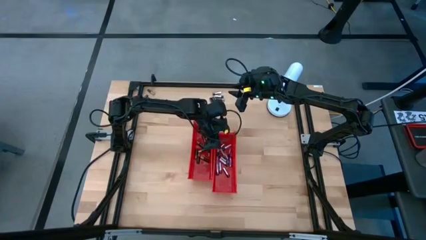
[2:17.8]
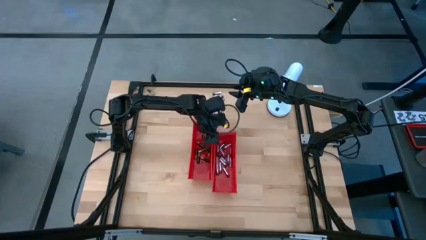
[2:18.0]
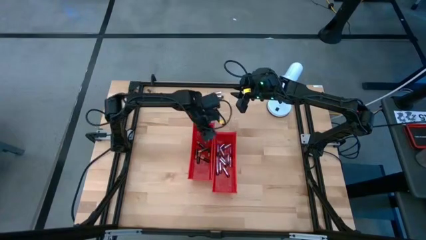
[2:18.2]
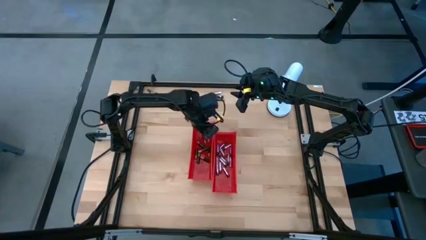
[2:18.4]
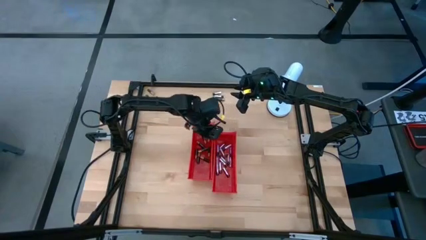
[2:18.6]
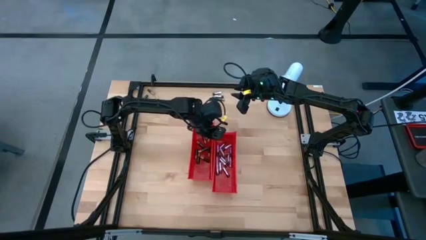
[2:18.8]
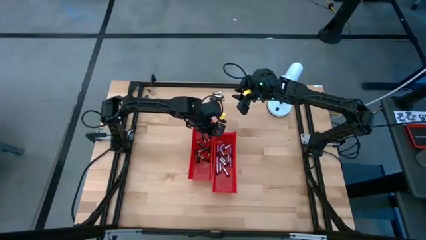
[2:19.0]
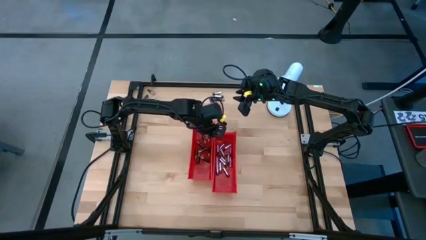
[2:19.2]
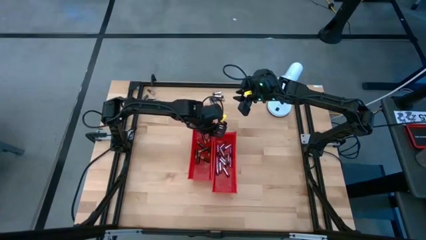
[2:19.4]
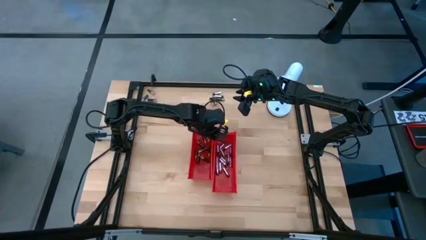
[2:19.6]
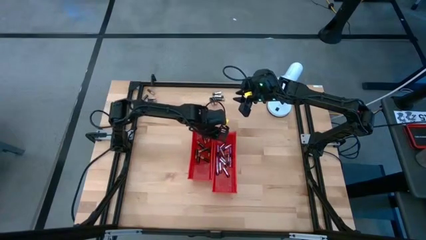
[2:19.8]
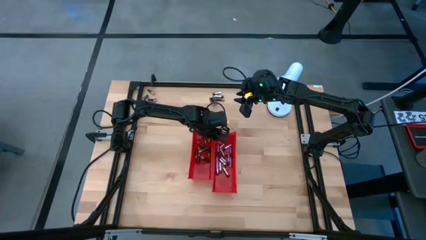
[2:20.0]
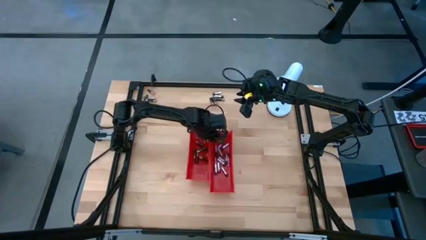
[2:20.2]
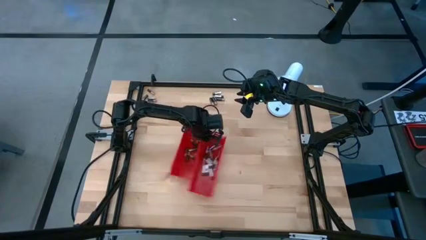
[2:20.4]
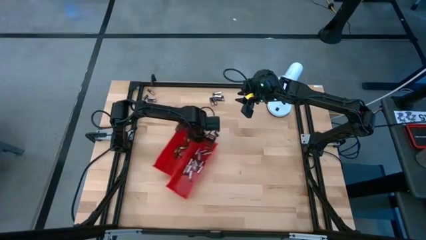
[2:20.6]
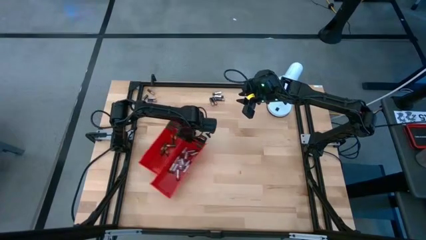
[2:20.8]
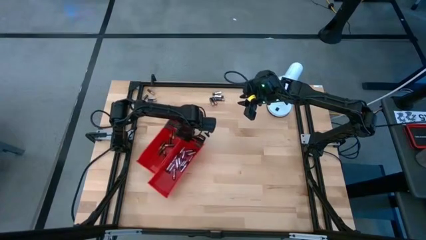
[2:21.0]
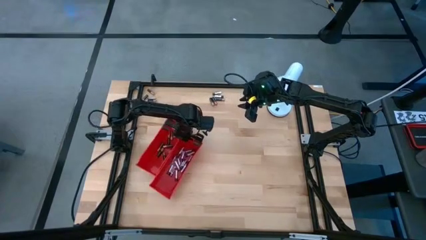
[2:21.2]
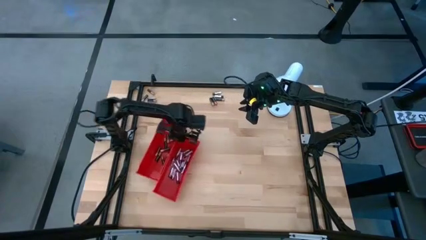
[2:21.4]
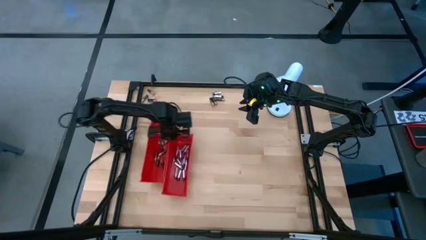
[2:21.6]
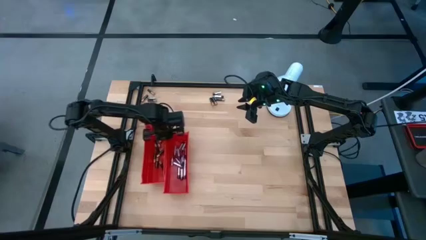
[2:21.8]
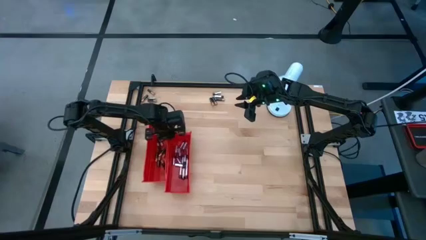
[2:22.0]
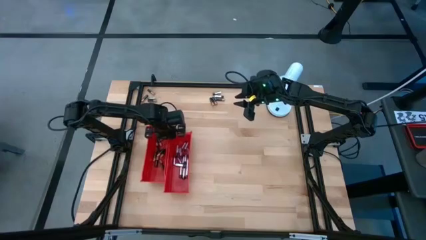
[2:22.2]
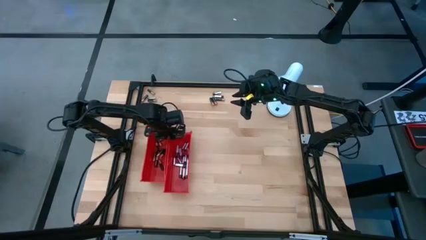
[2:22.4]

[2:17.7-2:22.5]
Task: Sort batteries
Move the bins from the center to the middle left side of the table

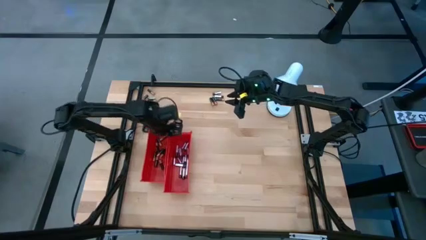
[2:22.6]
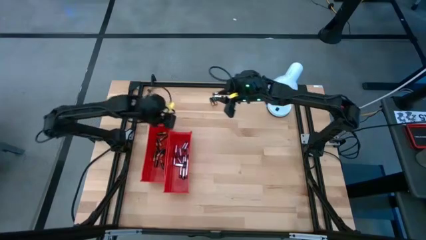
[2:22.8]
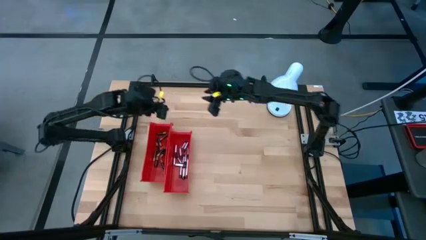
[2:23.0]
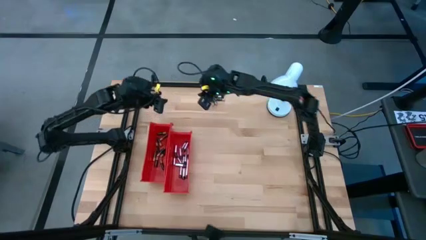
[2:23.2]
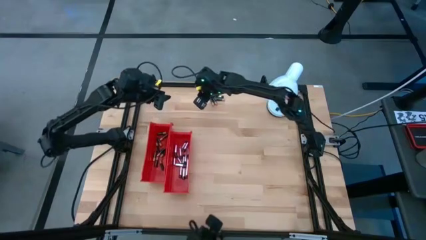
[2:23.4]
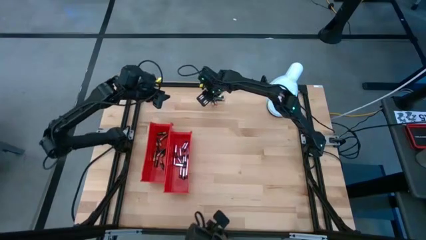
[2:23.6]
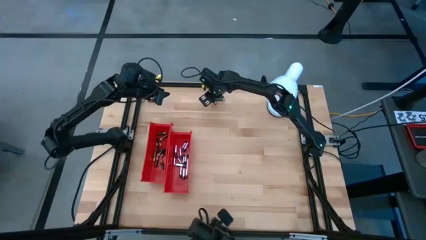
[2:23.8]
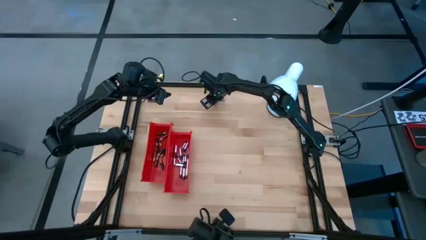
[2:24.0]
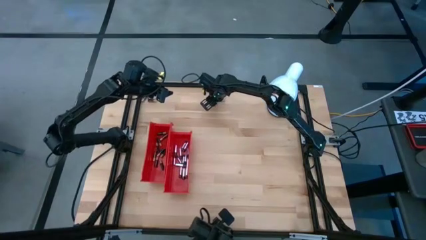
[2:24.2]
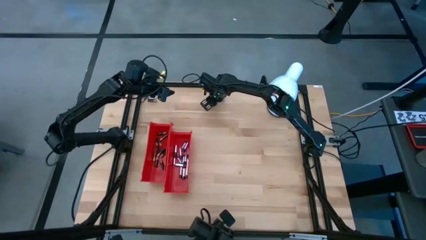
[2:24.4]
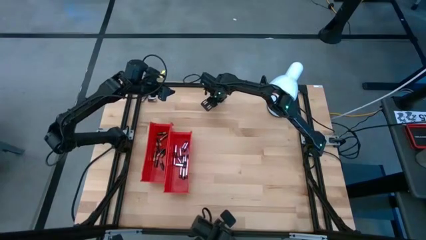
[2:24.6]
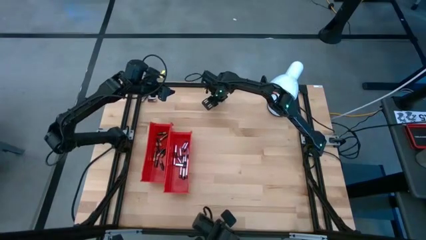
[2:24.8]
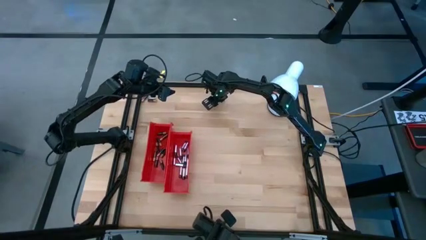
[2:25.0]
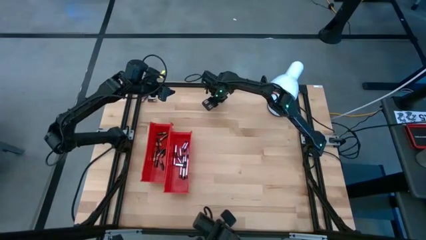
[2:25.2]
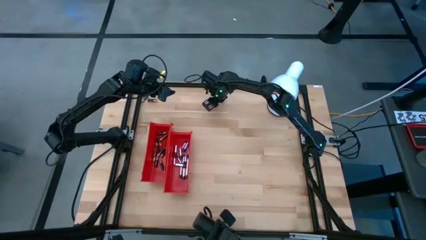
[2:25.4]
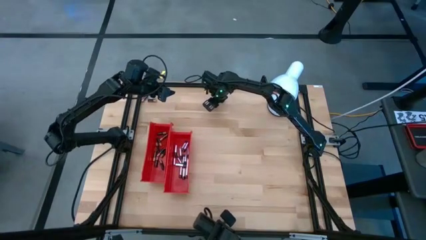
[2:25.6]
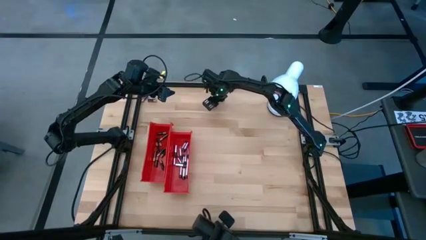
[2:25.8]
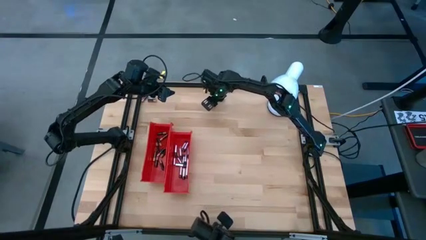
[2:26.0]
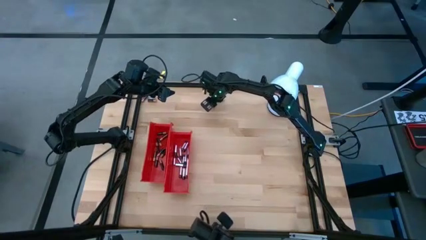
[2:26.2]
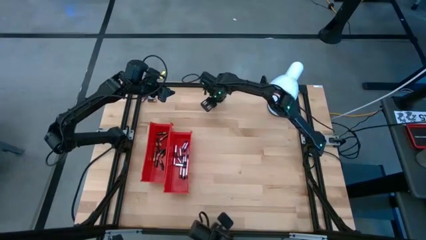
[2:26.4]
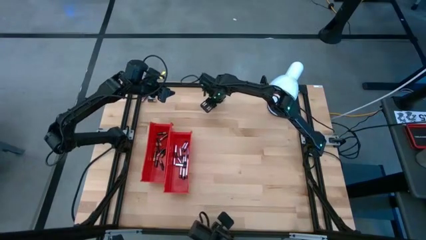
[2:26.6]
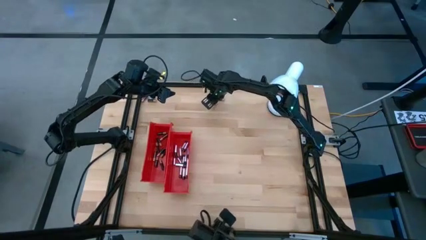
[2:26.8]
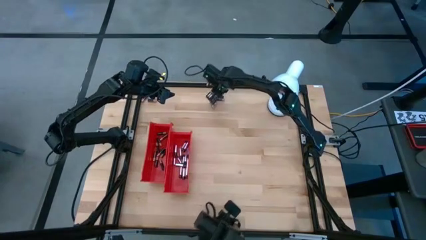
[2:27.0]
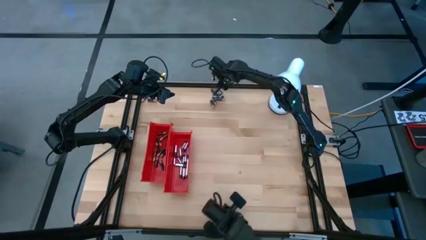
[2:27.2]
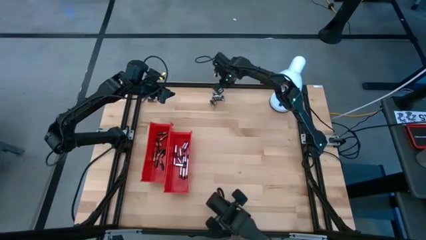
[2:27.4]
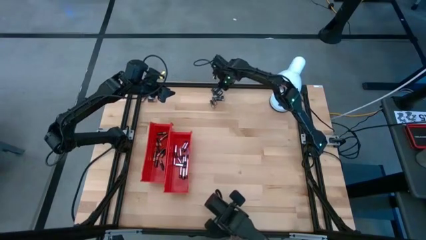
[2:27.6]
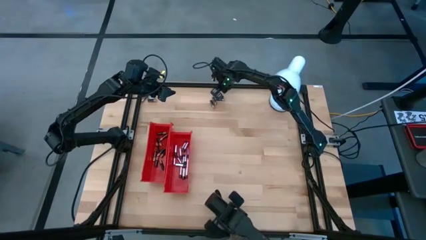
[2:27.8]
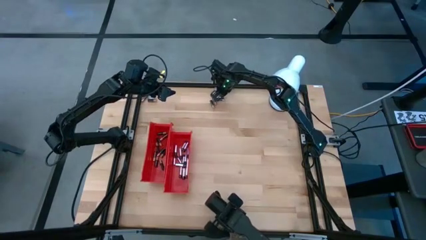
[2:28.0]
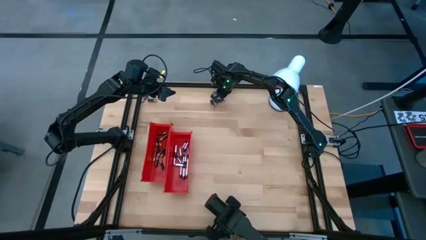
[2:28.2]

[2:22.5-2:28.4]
Adjust the batteries on the table

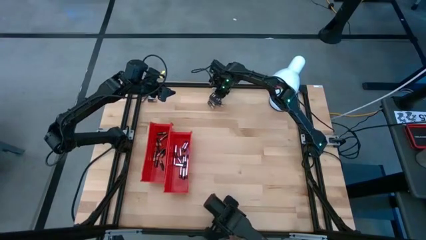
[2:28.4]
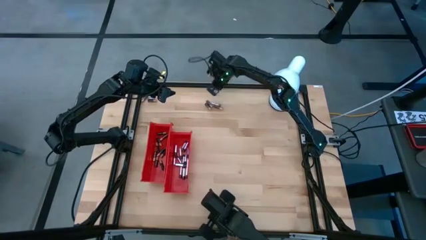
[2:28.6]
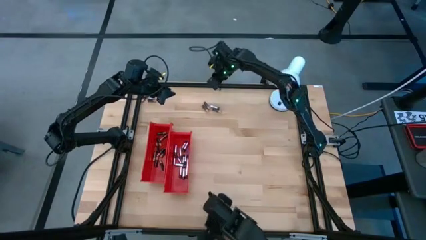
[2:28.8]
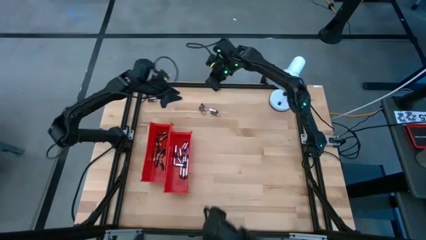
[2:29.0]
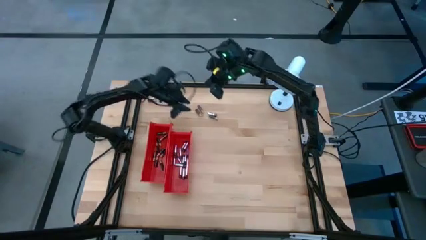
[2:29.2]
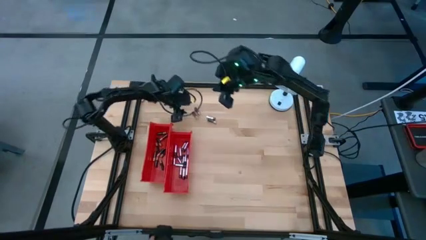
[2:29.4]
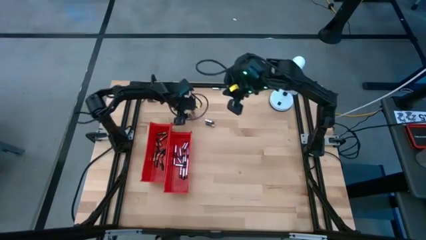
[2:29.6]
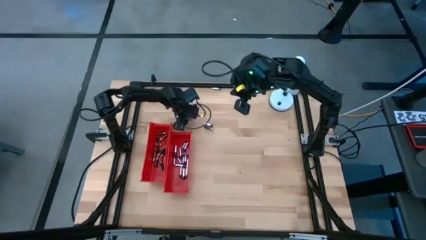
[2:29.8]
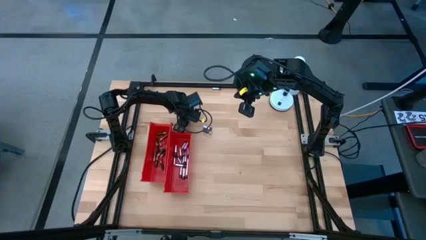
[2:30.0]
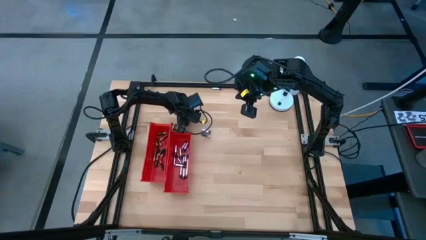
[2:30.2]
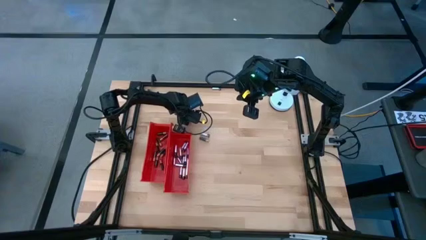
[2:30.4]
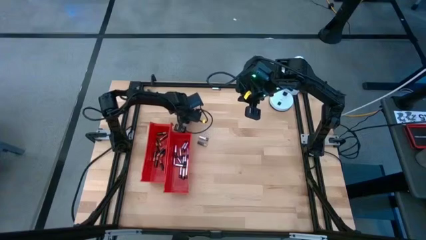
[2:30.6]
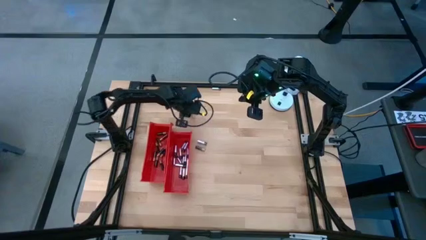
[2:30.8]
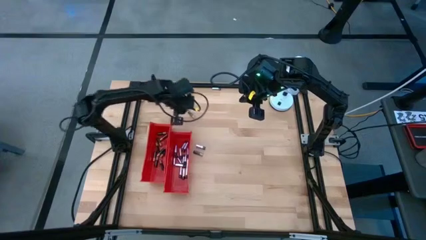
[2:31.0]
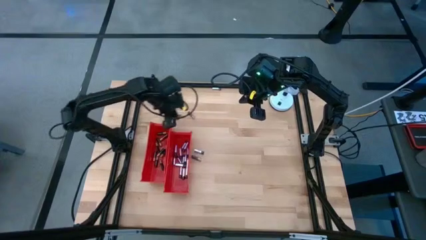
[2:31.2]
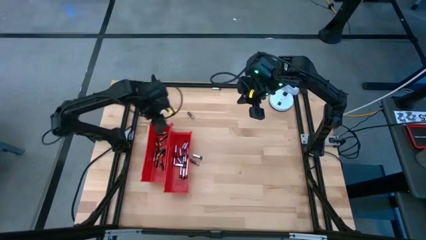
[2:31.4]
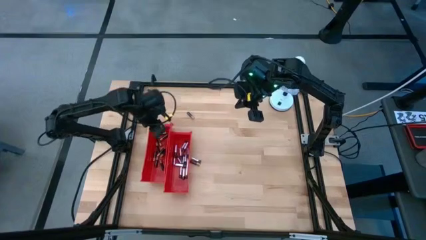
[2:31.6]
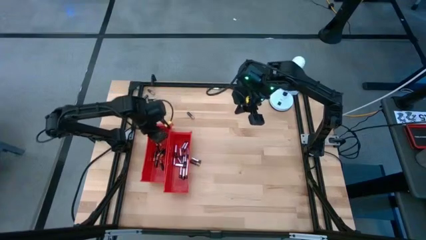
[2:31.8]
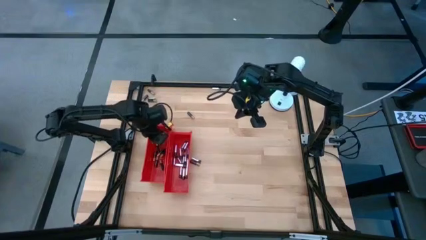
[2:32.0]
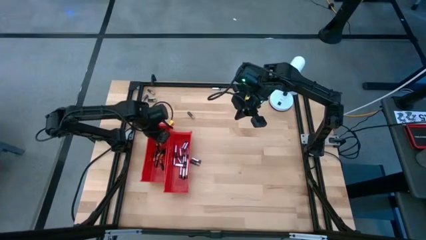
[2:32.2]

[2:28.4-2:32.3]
Put the black battery into the left red bin
